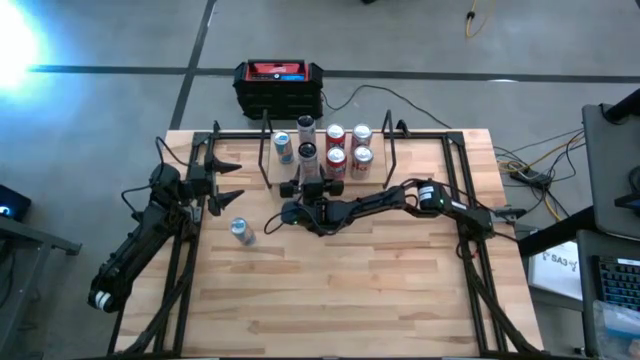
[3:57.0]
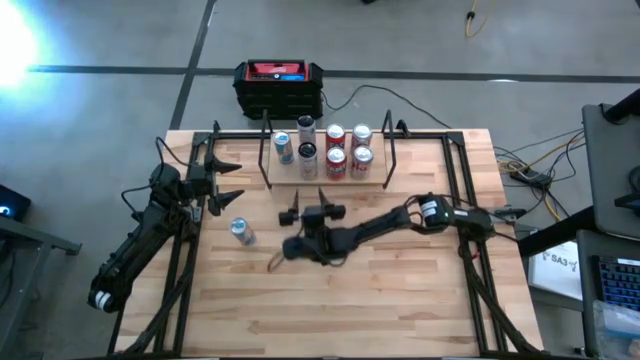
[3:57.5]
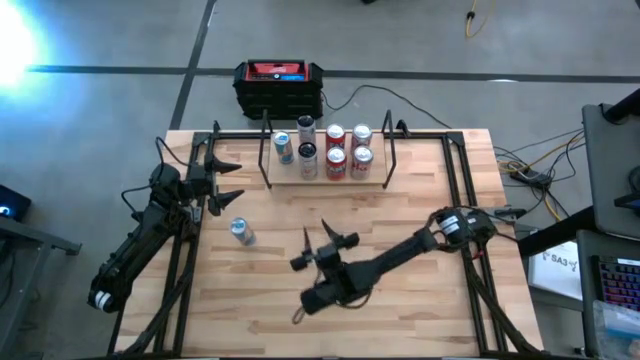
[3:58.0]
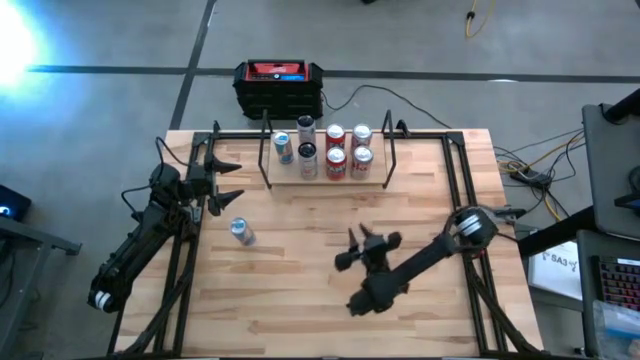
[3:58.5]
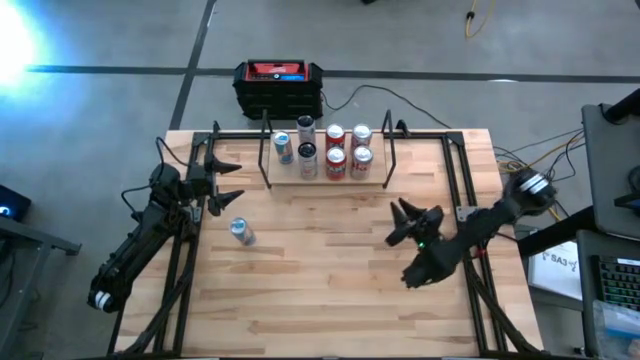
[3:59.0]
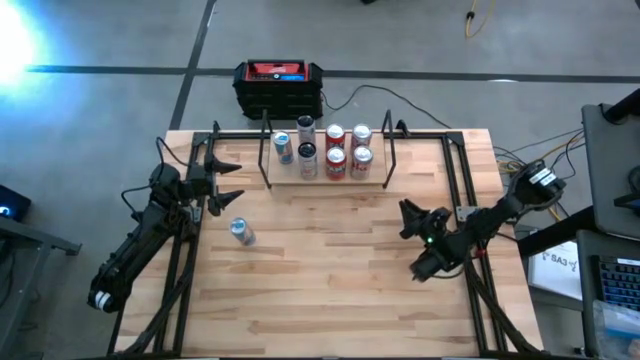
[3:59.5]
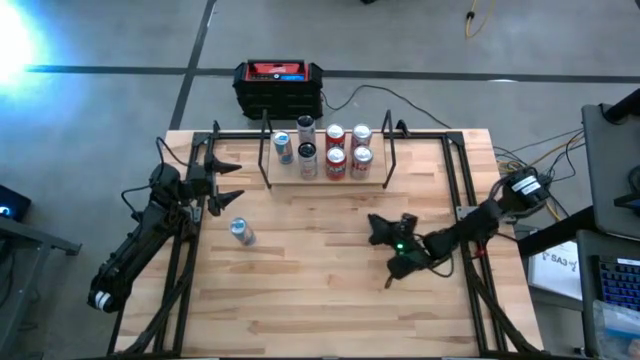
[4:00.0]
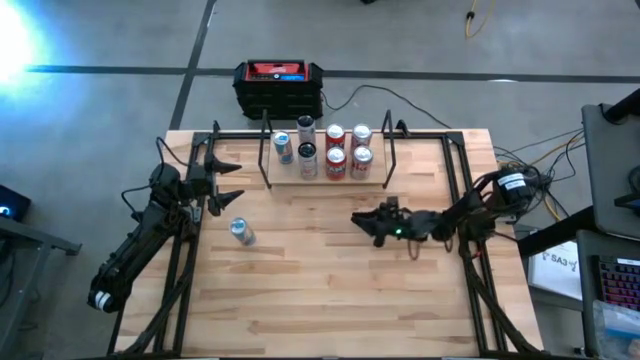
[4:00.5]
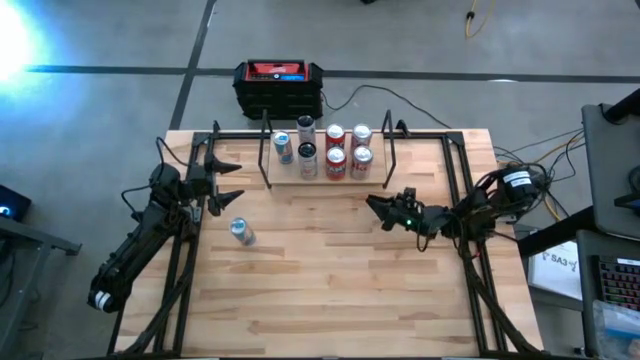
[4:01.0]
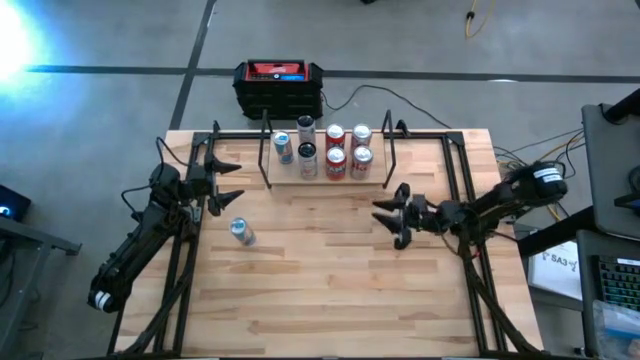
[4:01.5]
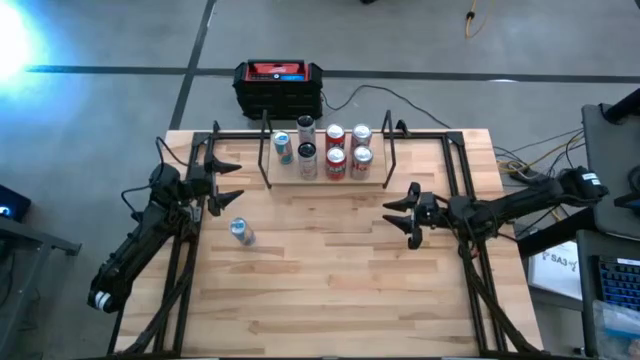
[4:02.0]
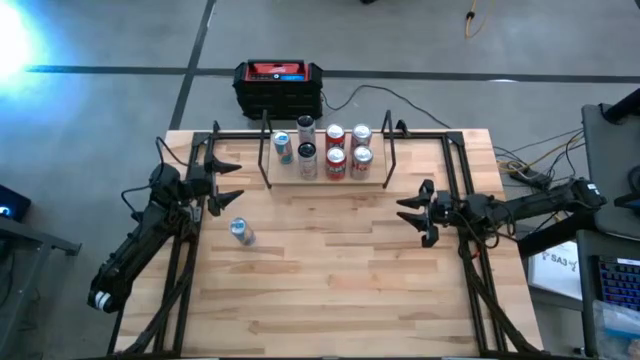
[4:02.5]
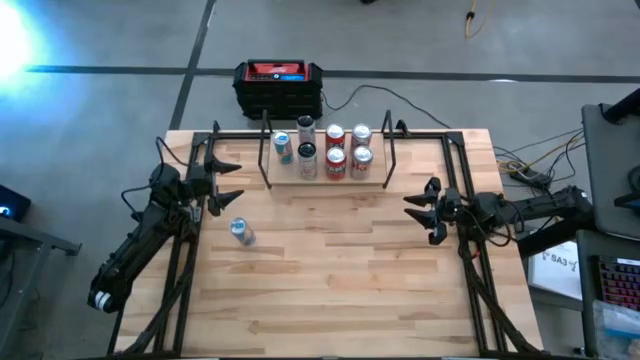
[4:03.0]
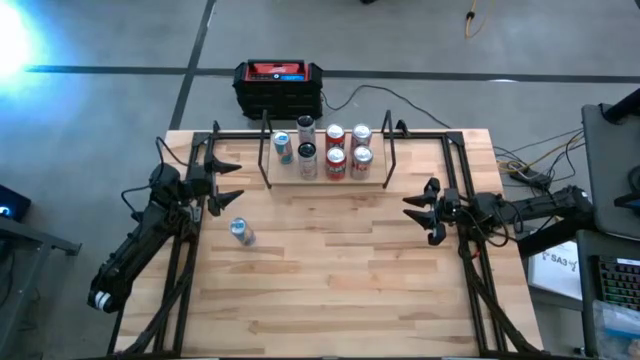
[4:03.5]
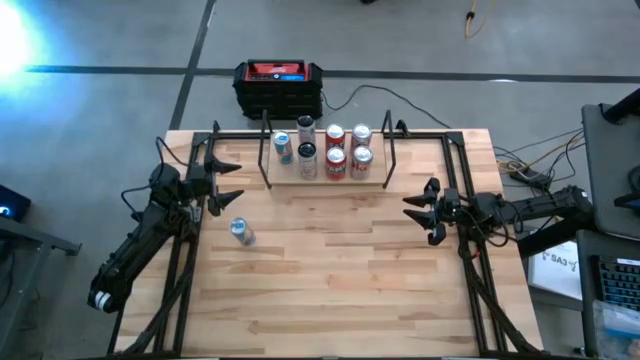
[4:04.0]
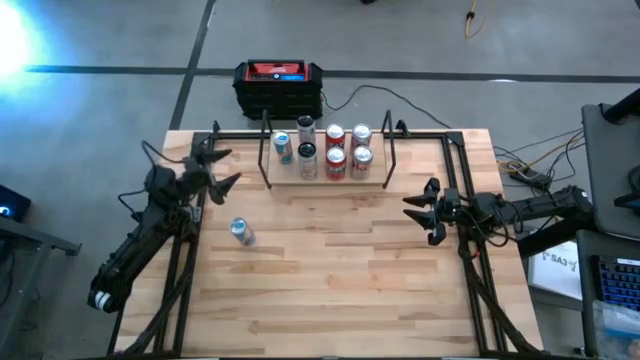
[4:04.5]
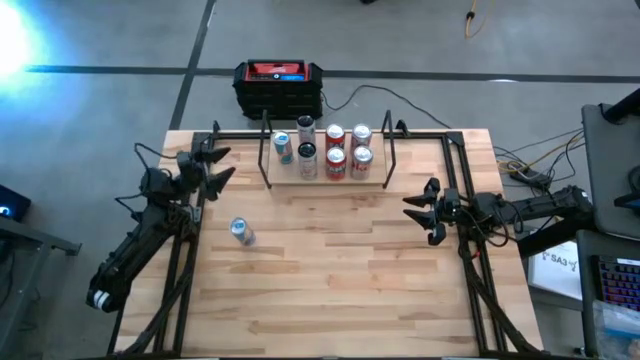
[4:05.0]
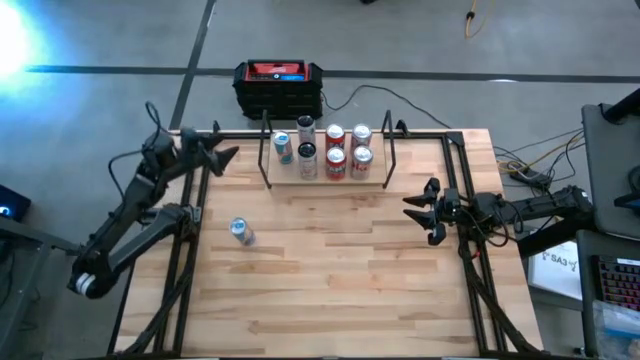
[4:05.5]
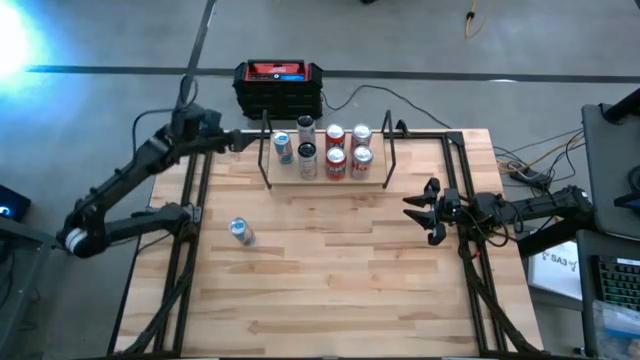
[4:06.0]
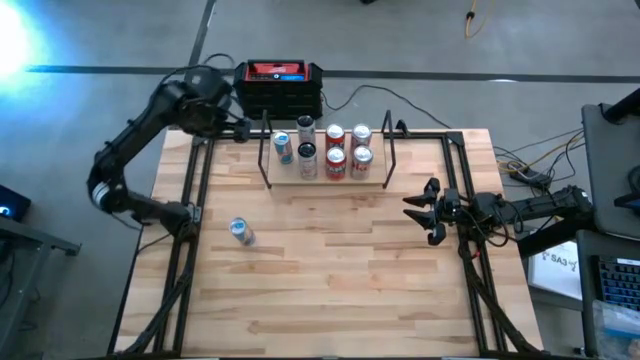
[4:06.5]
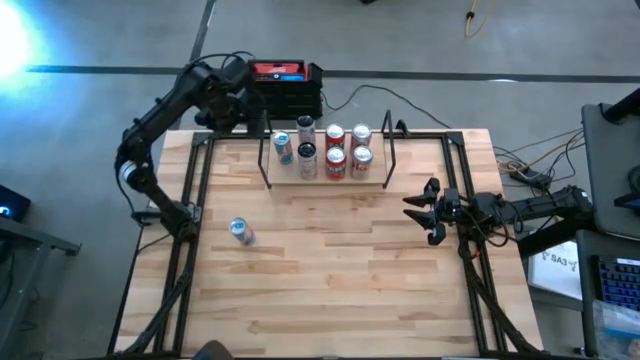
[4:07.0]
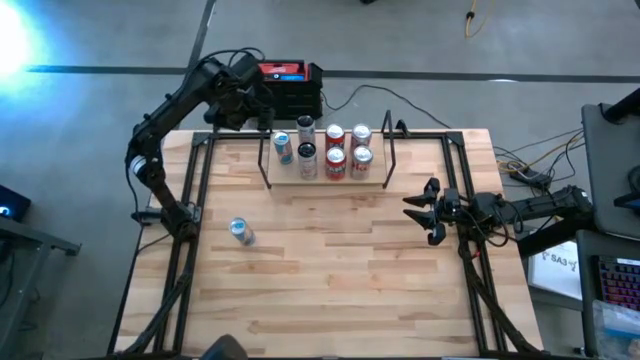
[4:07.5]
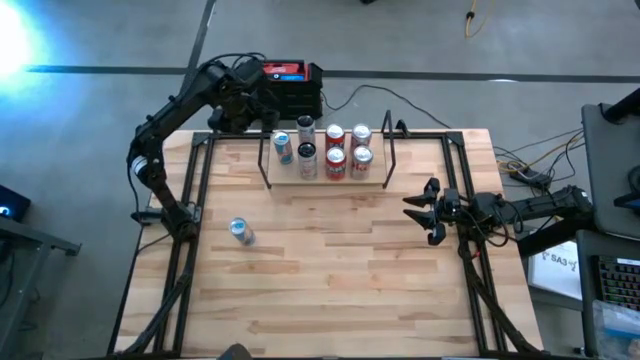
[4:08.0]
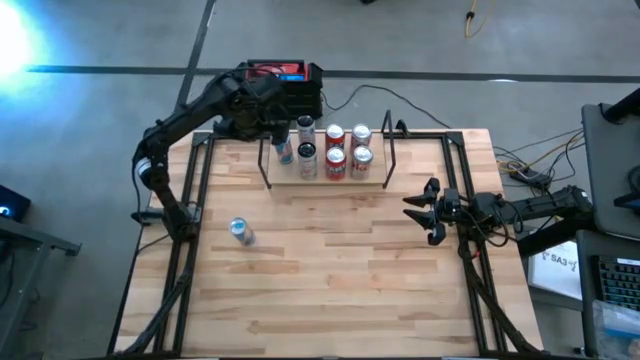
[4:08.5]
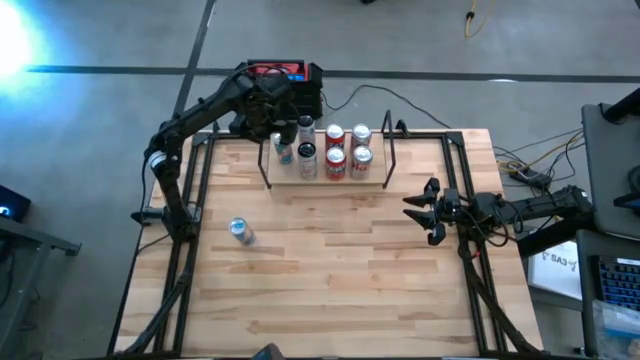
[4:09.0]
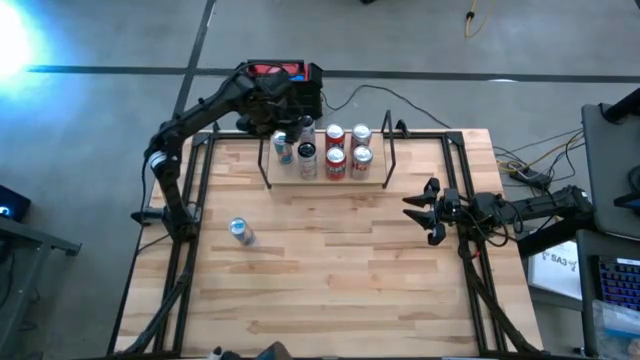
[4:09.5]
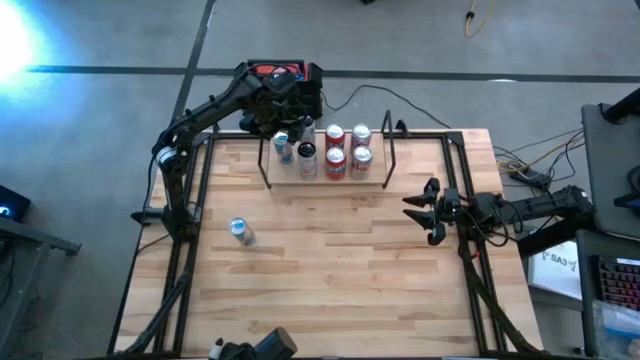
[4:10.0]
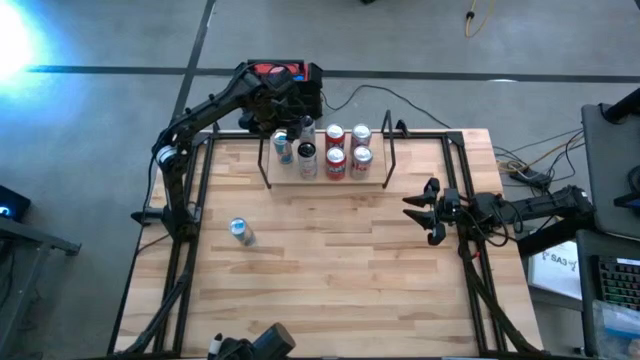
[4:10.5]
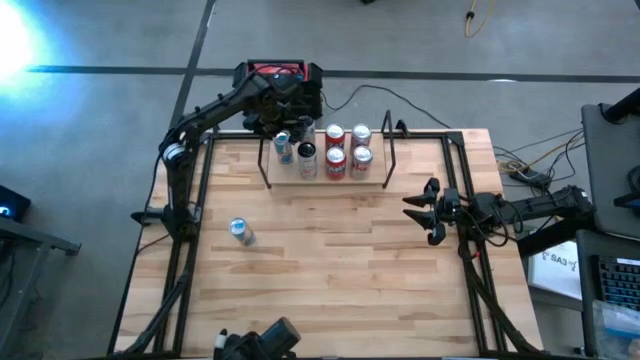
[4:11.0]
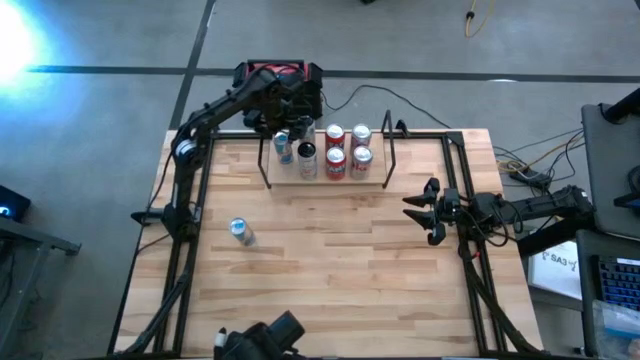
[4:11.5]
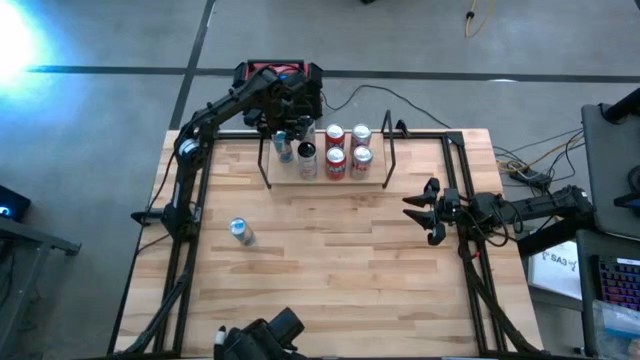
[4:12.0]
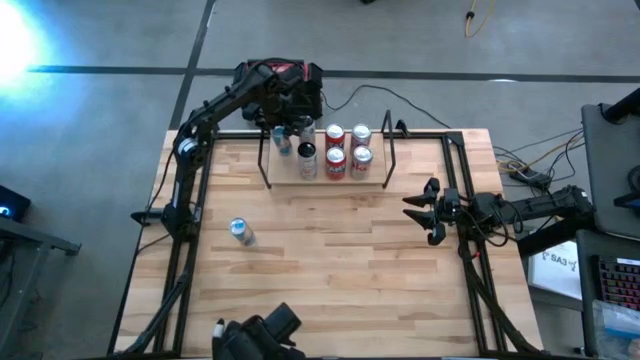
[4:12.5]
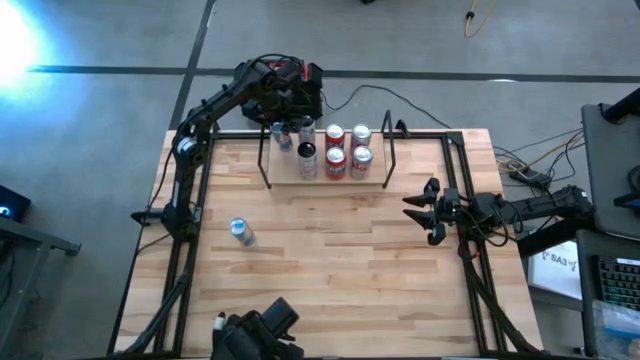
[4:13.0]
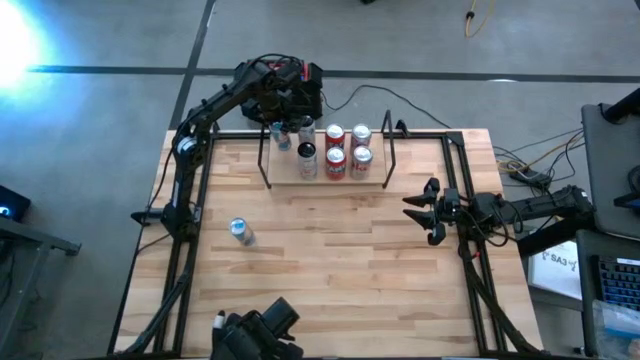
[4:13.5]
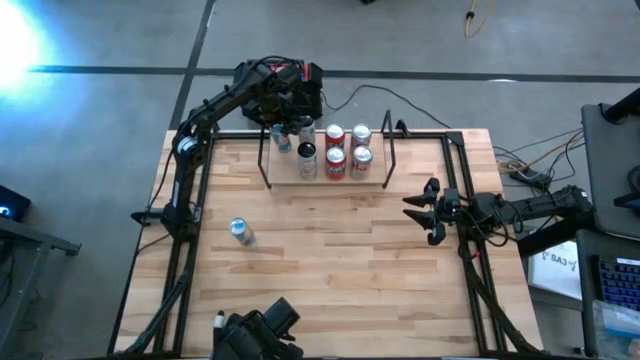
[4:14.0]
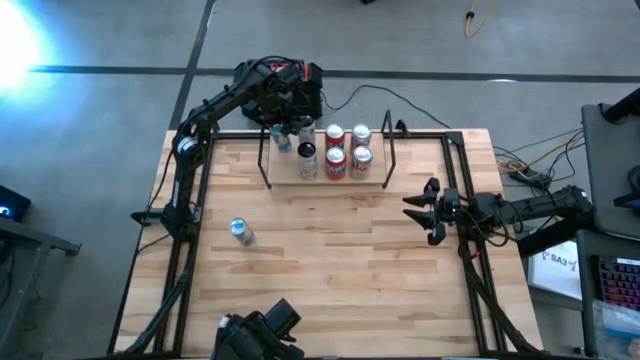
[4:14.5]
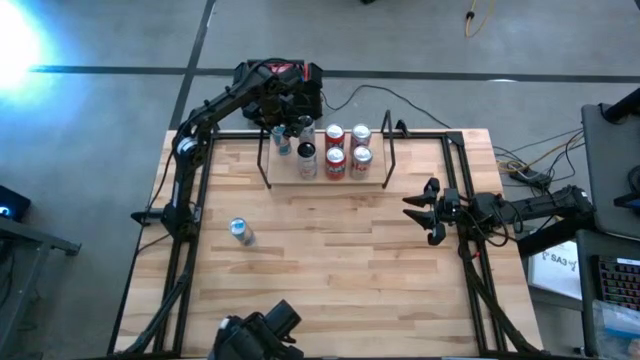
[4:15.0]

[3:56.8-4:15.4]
Task: Place canned beverage on shelf
Adjust the blue soda can on the shelf

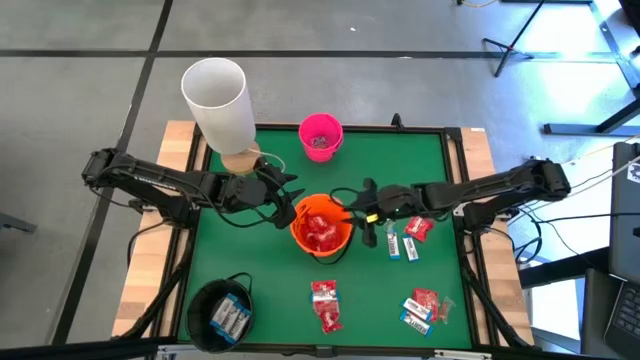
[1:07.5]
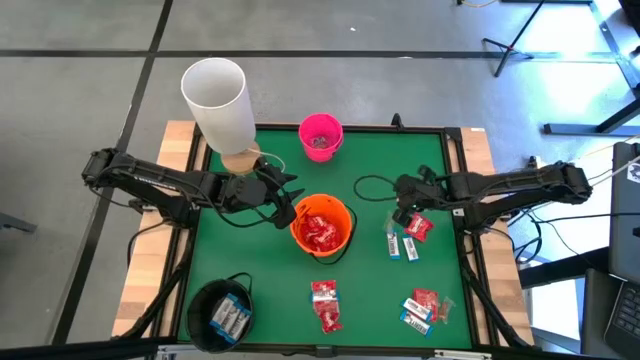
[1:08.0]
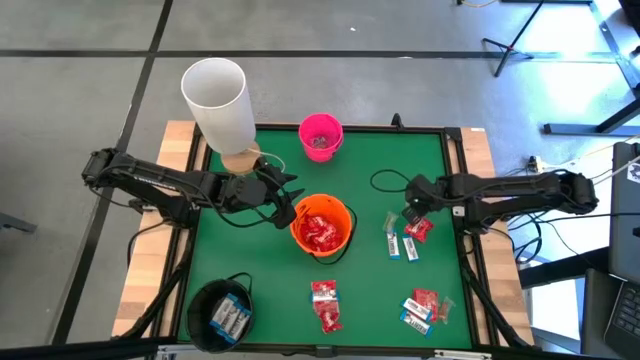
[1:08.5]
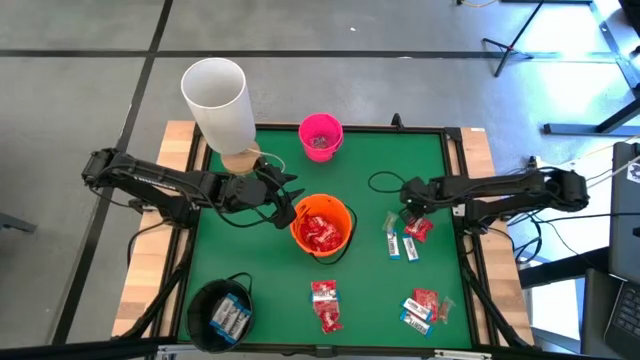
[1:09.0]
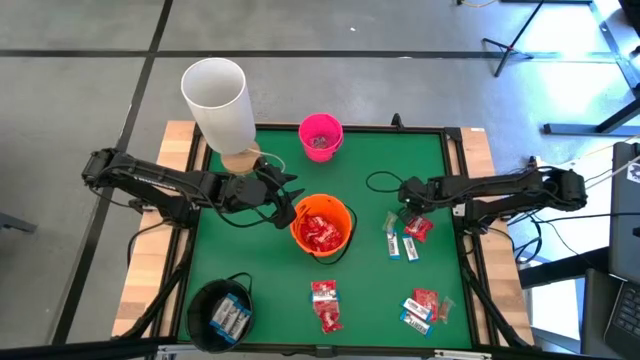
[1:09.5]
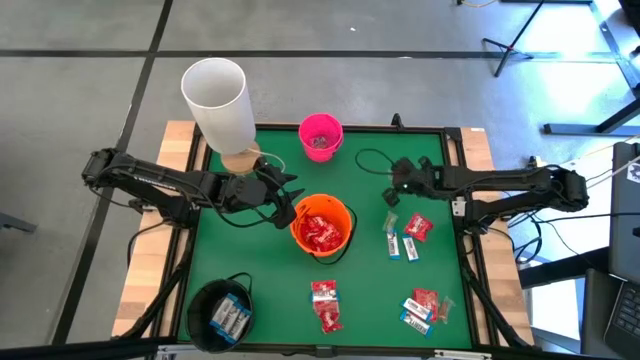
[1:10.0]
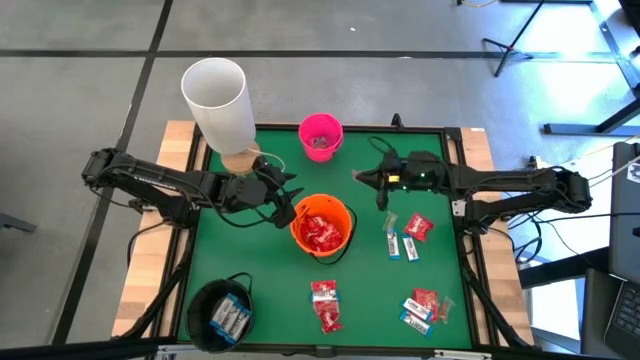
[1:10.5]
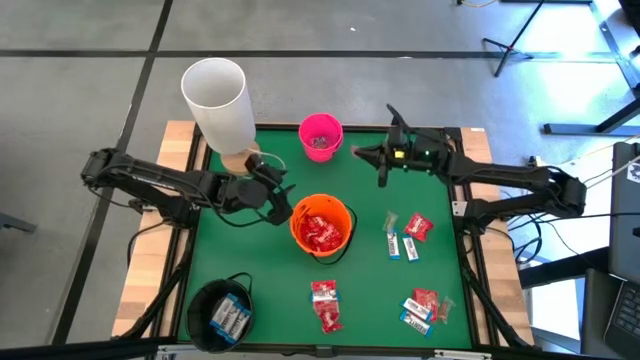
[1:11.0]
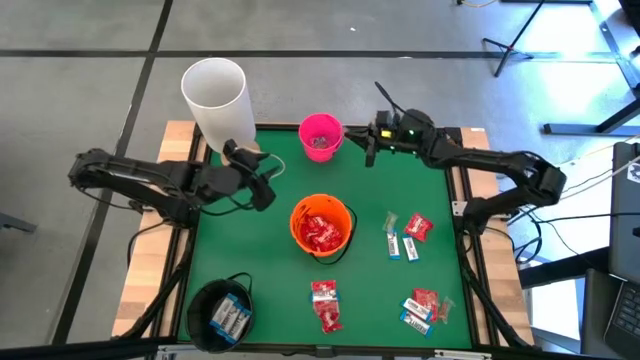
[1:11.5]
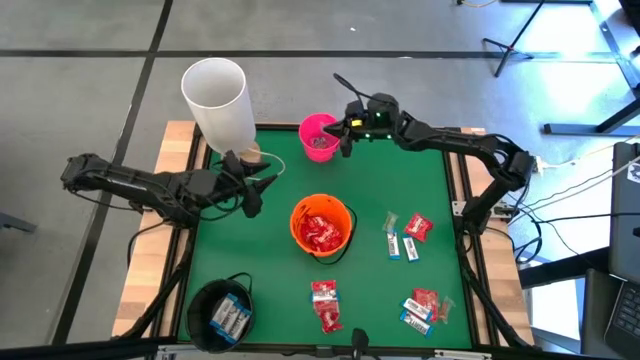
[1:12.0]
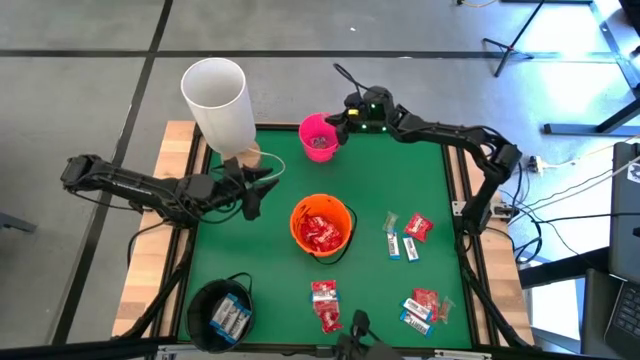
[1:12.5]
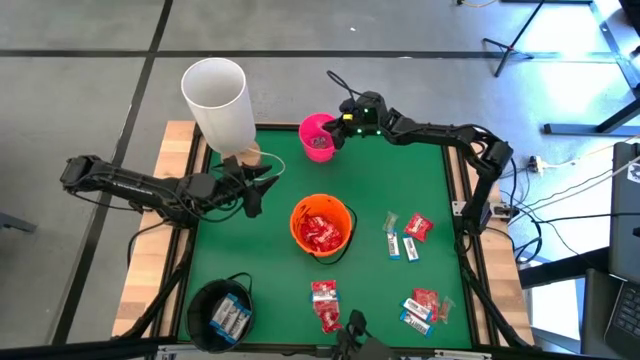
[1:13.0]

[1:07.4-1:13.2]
Task: Sort candy
Put the orange gummy into the pink bucket
